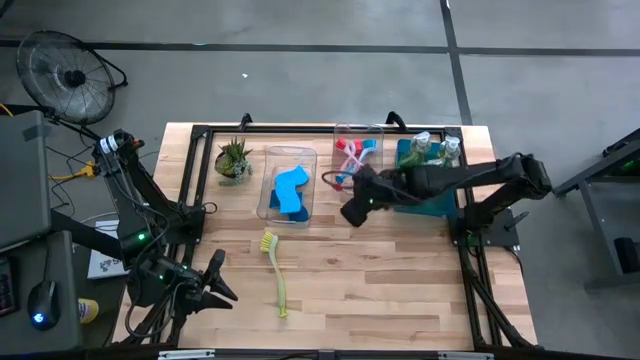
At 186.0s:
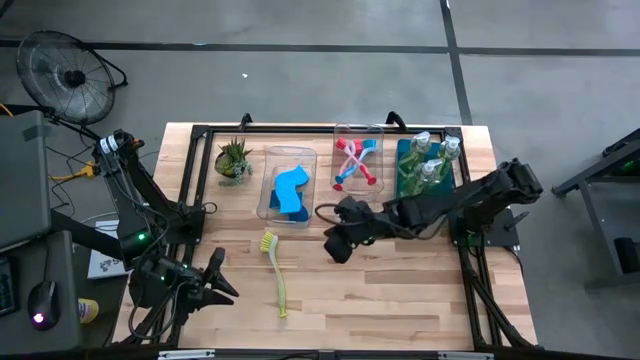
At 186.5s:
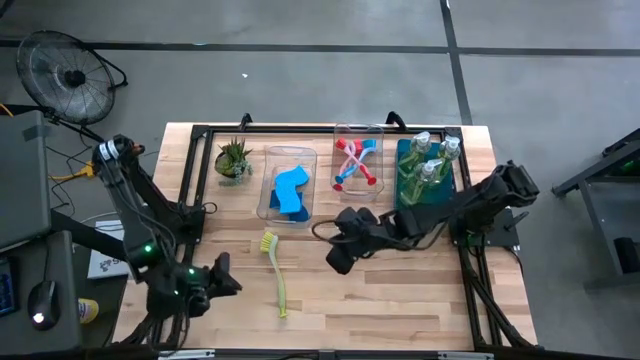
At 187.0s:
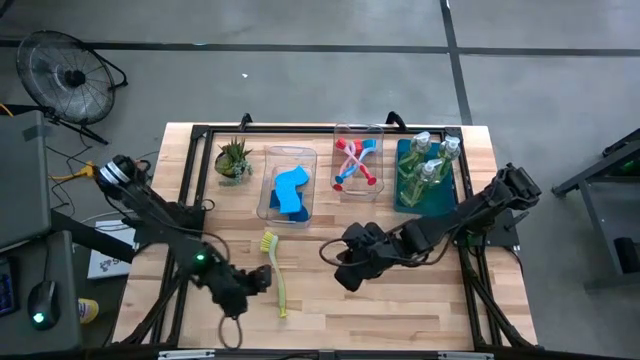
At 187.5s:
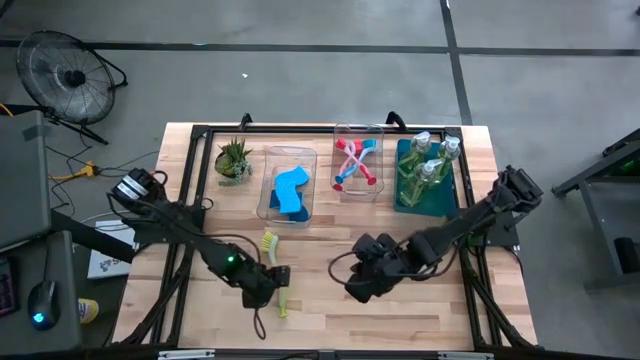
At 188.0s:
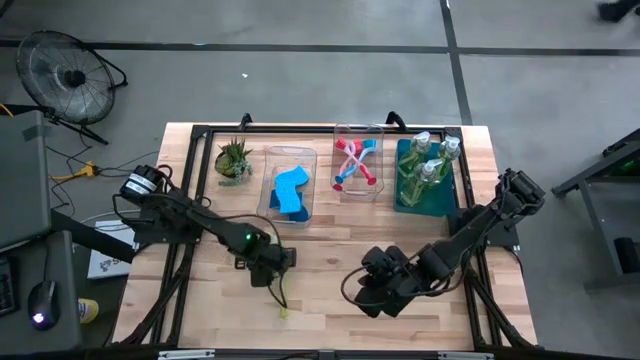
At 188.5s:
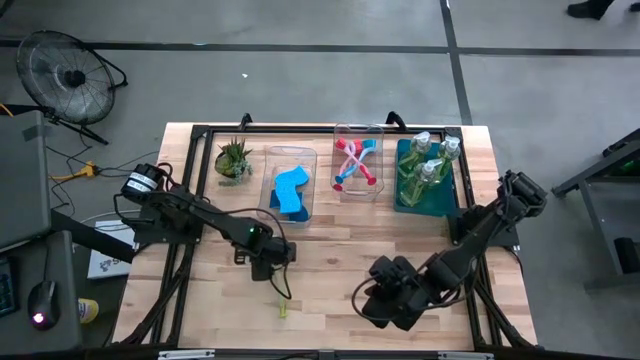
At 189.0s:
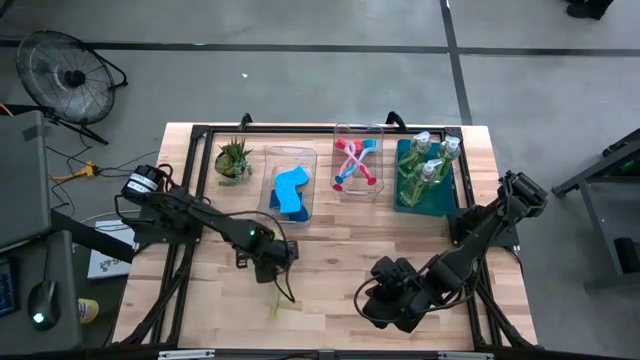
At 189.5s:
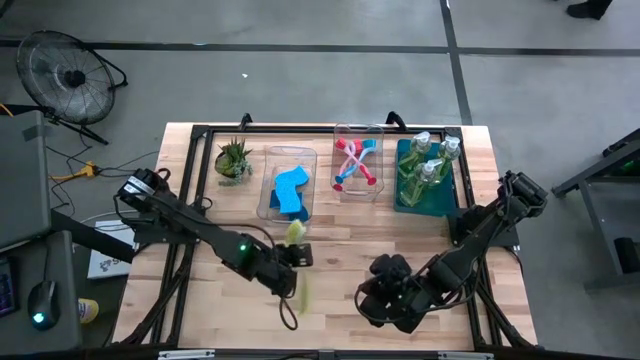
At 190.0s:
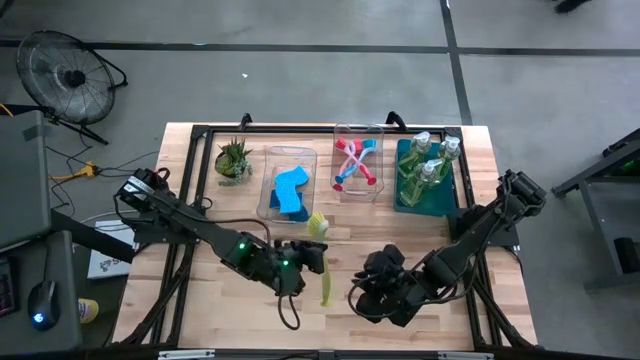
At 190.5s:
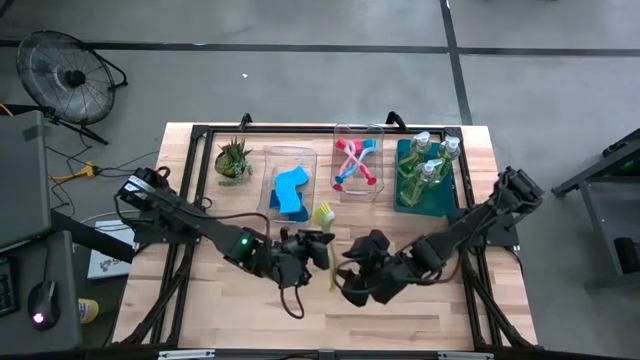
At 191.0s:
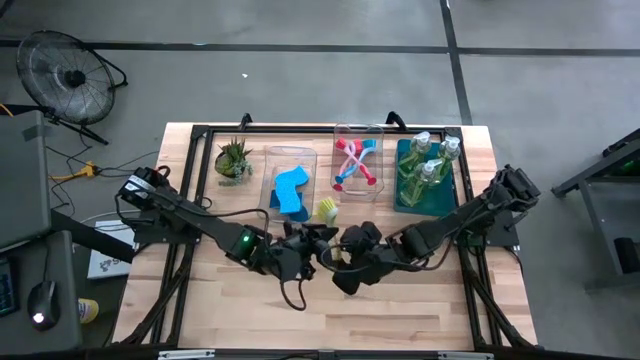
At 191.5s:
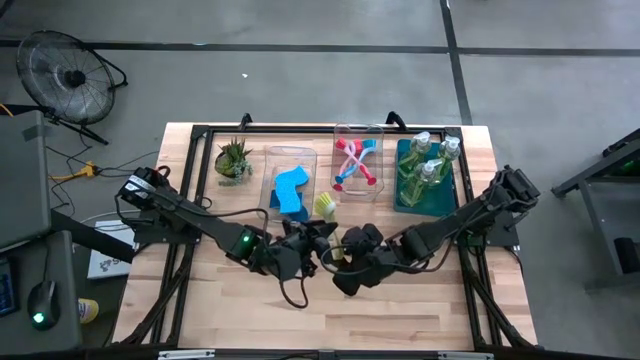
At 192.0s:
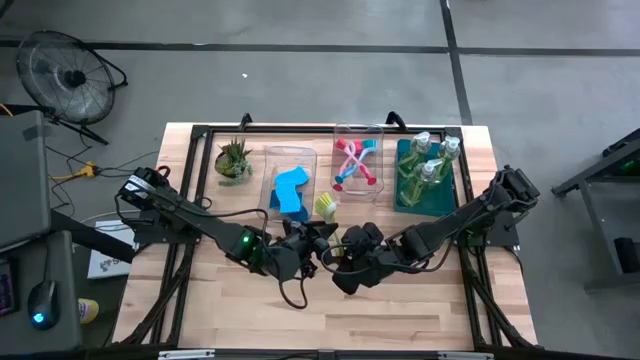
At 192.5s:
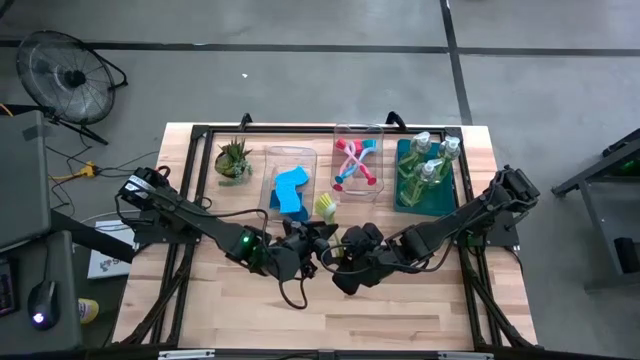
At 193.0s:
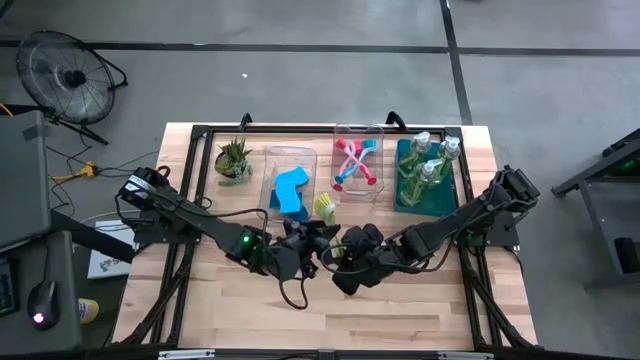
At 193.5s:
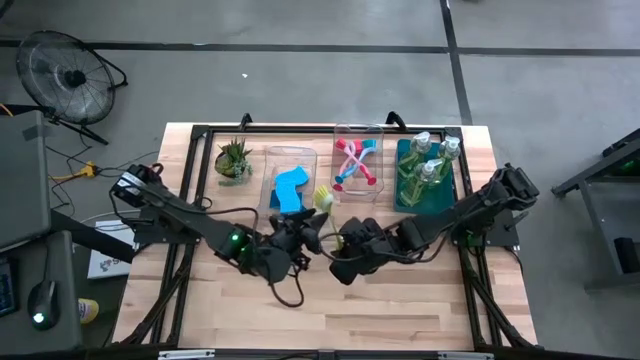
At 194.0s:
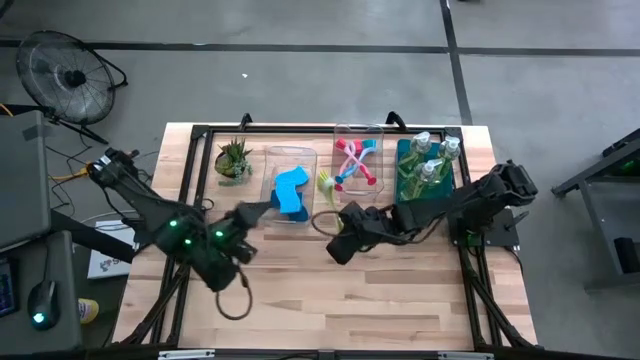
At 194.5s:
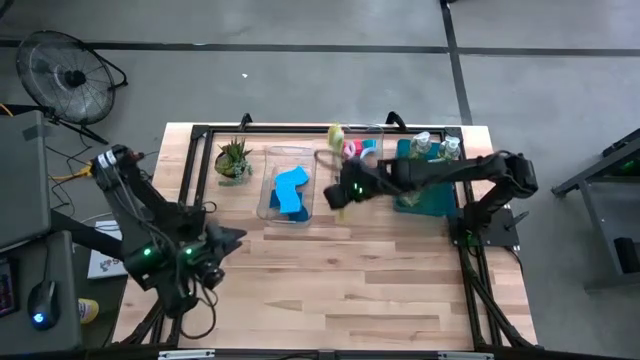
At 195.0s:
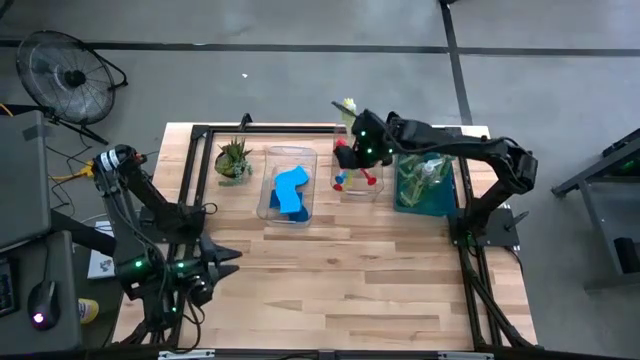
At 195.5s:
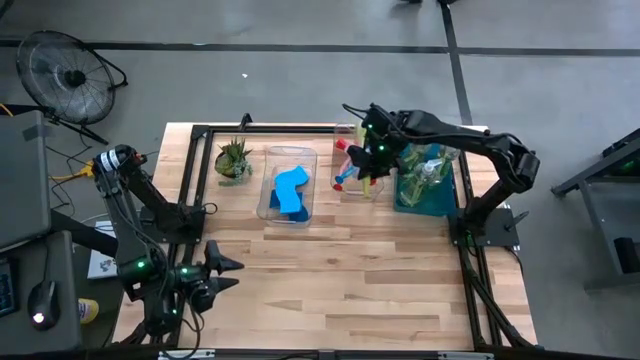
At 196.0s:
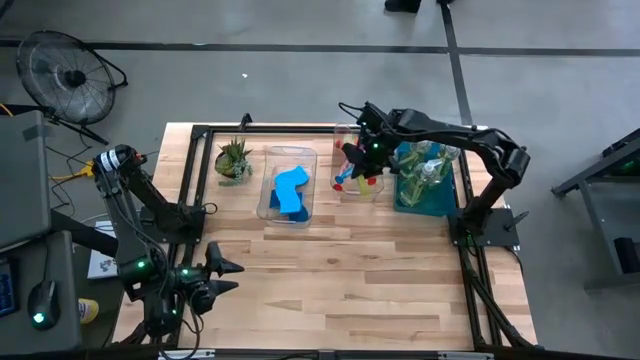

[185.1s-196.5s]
Task: Pick & Place Kitchen Sink Supplies
Put the yellow green dishwashing brush into the right transparent bin

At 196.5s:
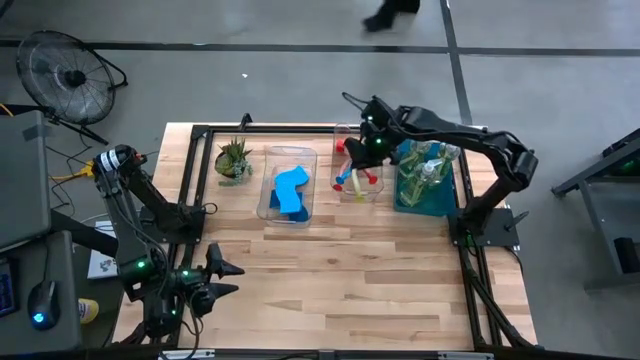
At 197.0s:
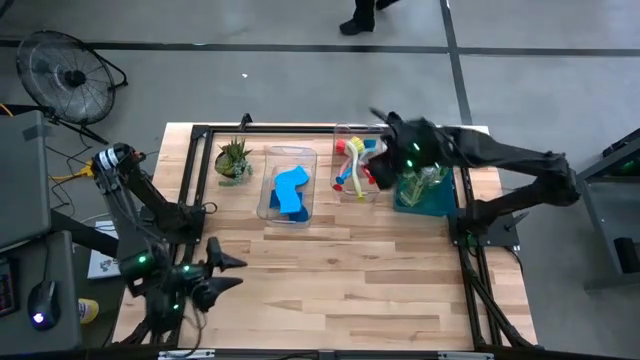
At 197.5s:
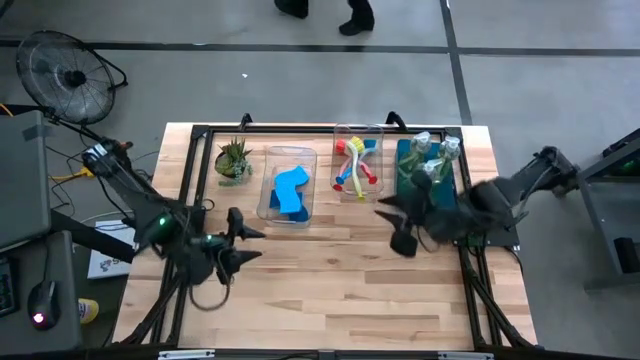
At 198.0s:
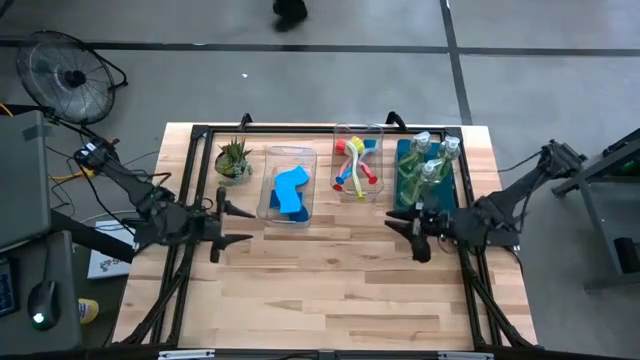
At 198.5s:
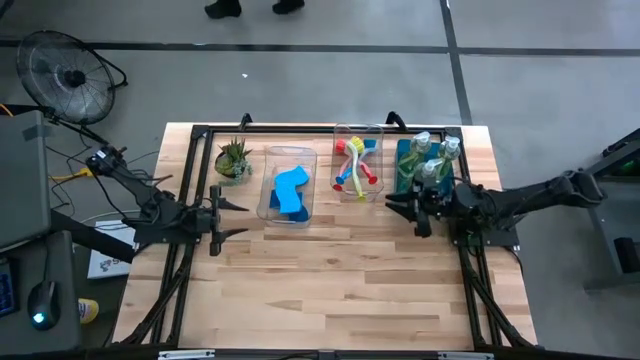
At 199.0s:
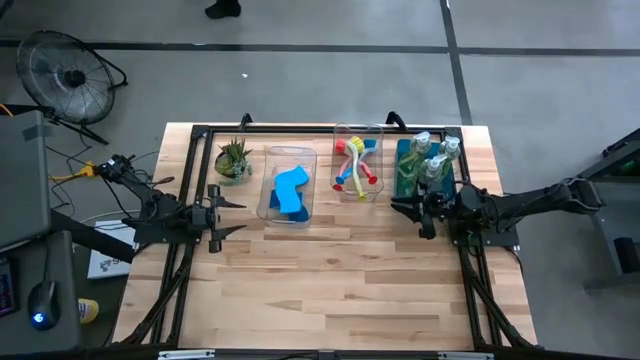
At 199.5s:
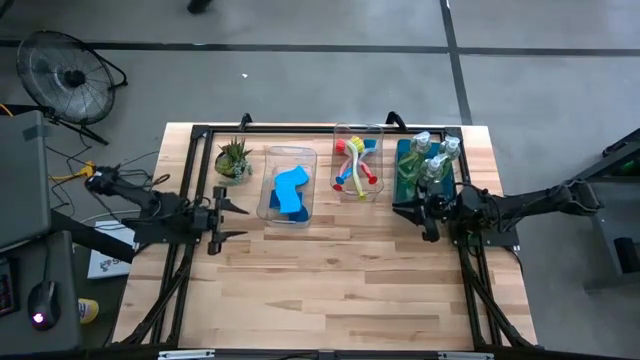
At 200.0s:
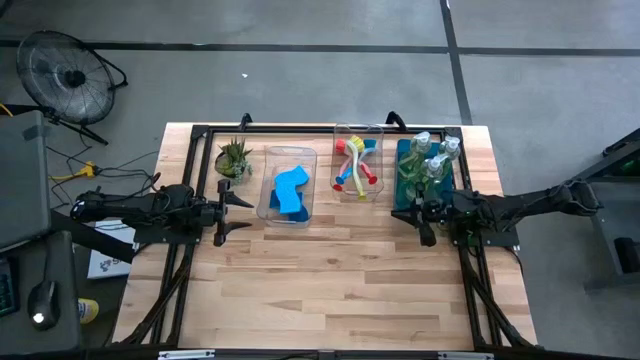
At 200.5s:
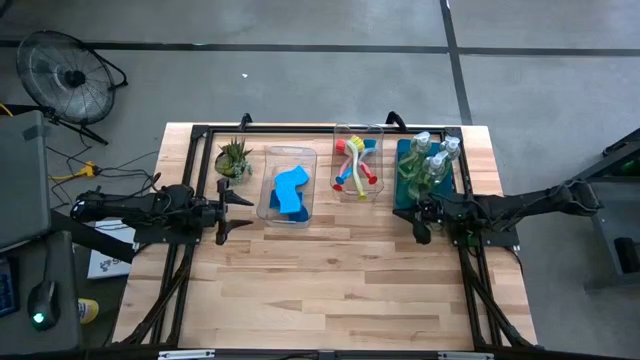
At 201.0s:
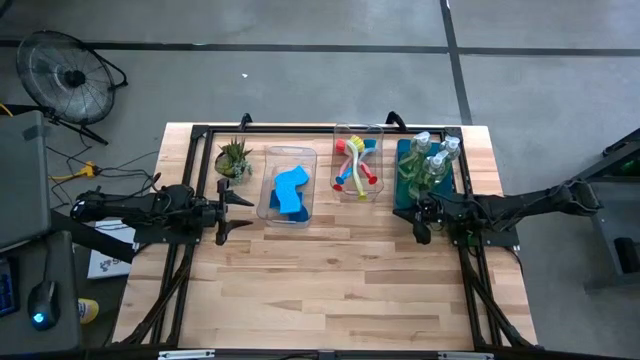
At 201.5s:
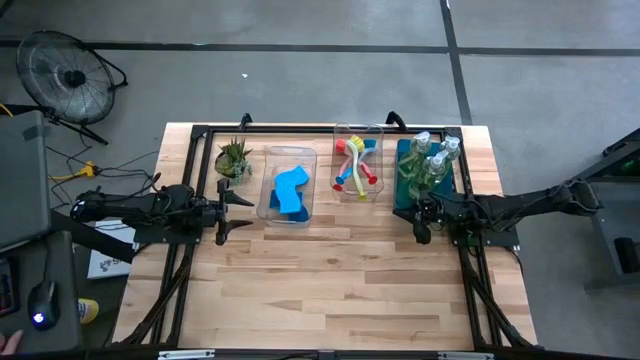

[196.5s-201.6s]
Return to Home Position

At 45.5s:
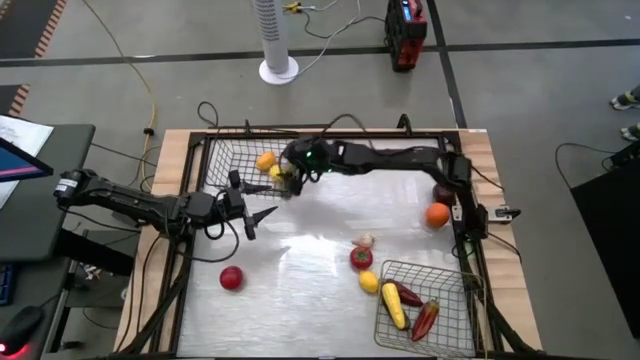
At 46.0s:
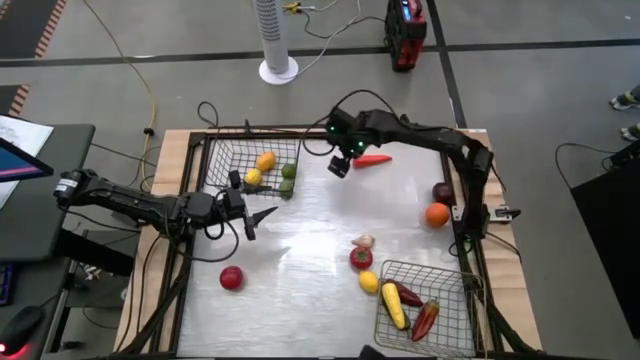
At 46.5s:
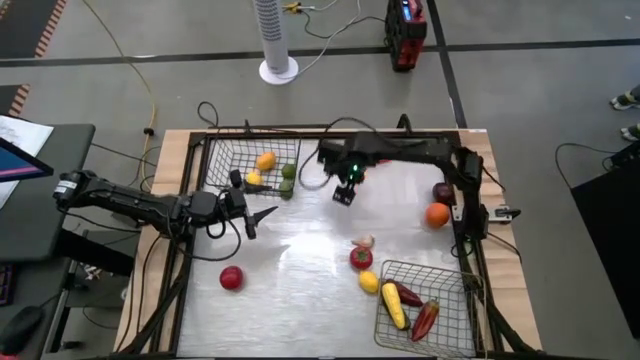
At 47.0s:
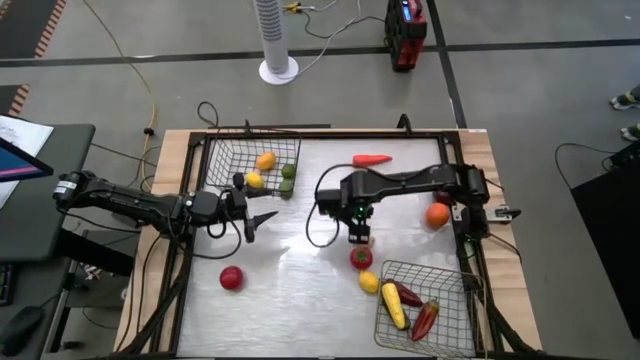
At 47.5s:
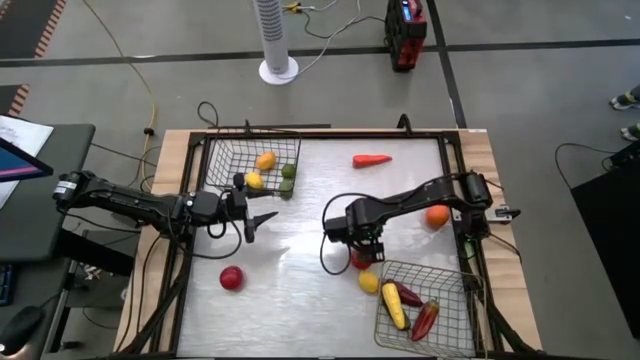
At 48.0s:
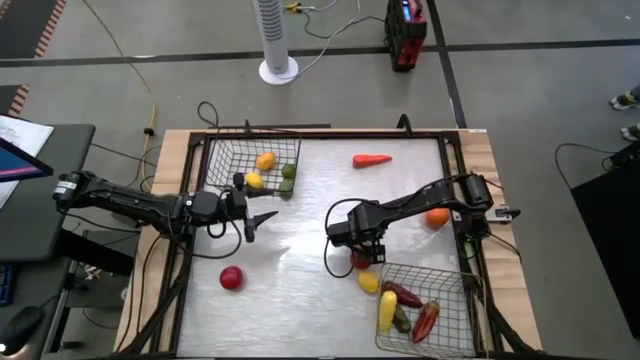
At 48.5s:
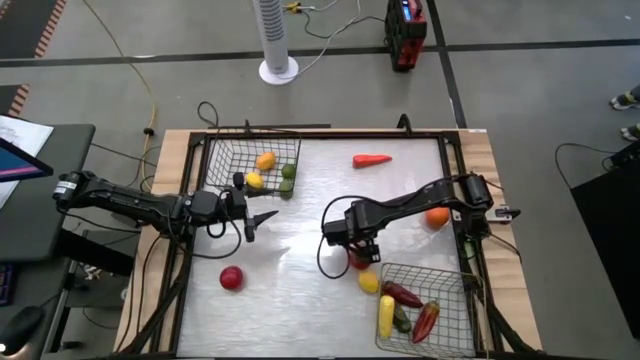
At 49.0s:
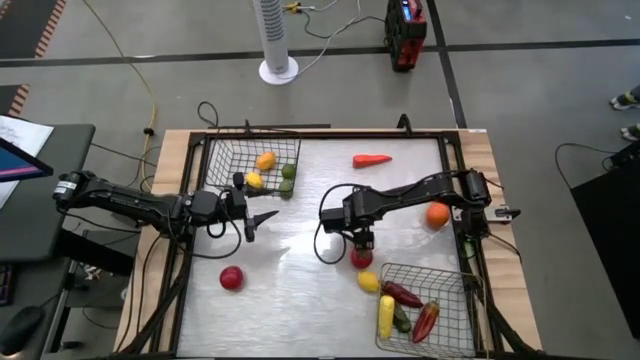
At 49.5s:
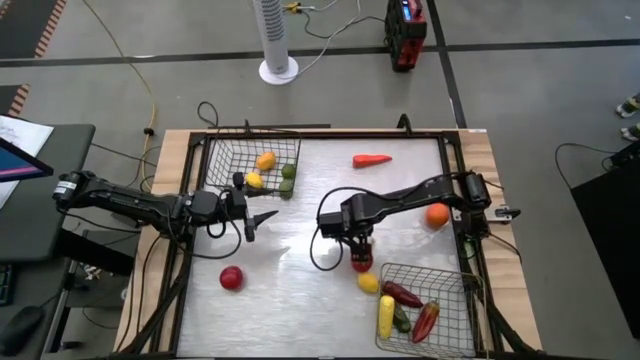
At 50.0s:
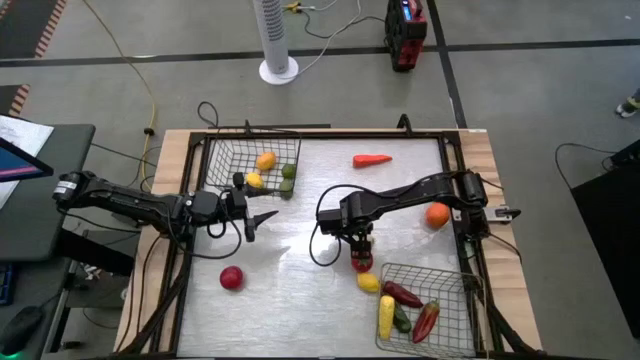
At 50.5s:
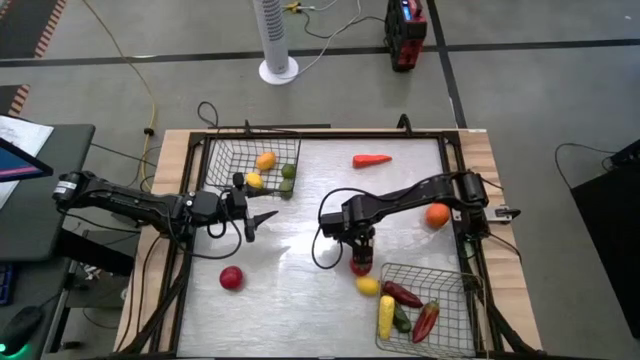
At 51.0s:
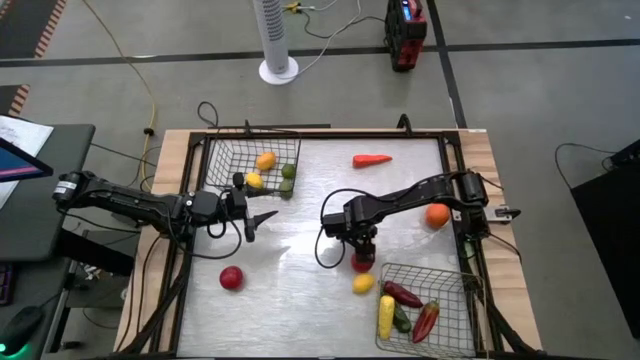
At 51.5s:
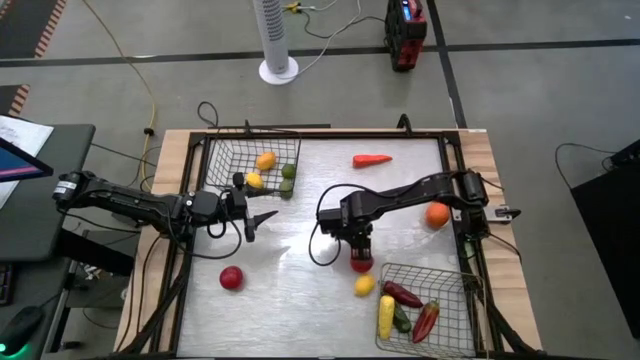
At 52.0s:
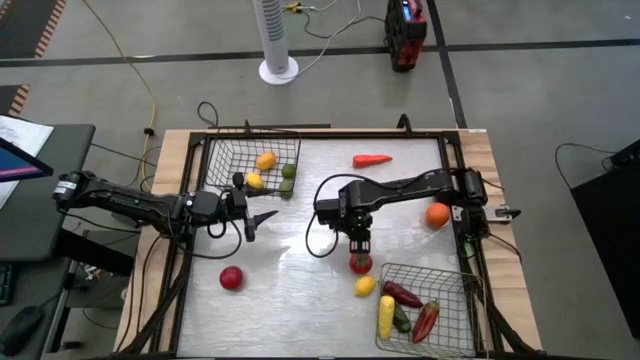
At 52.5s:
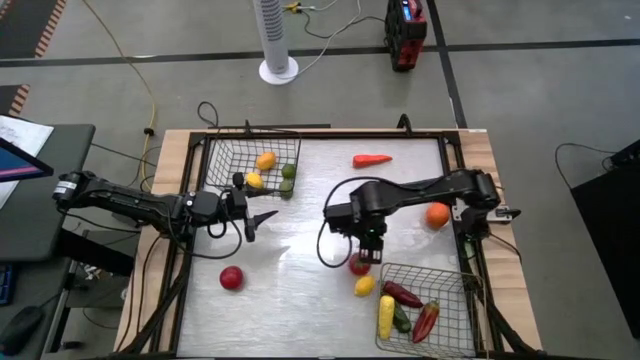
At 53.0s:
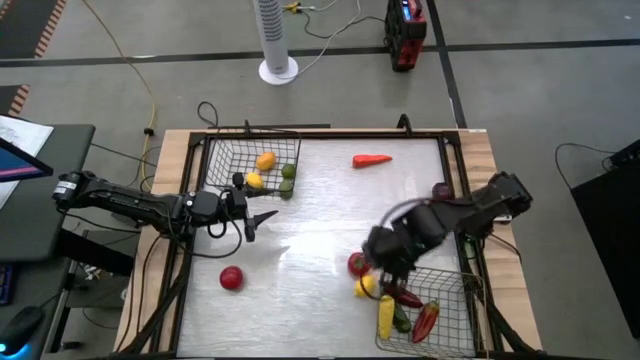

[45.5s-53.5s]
Task: Sort produce into baskets
Put the garlic into the golden wire basket
